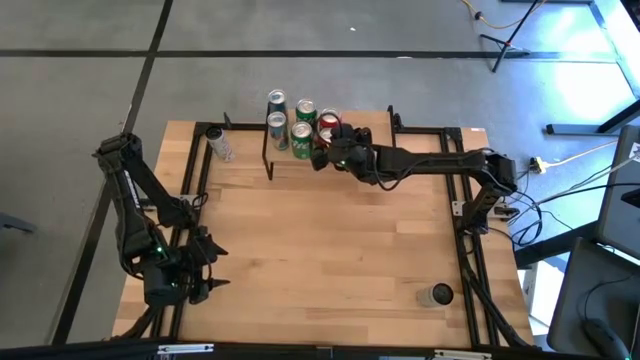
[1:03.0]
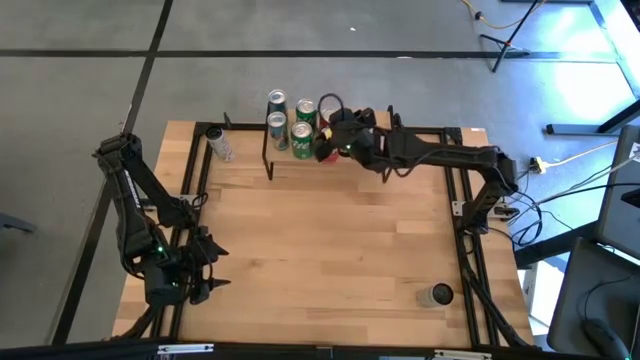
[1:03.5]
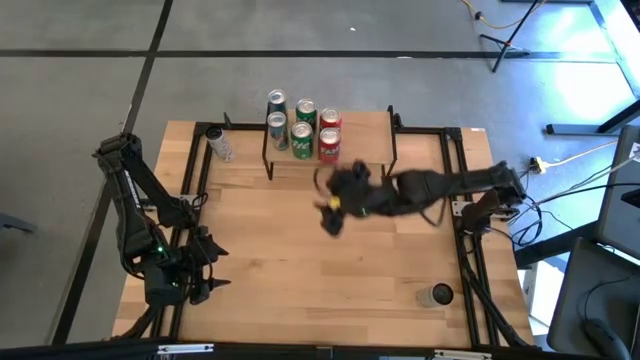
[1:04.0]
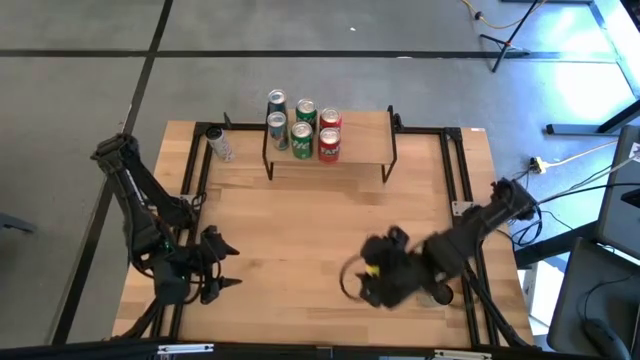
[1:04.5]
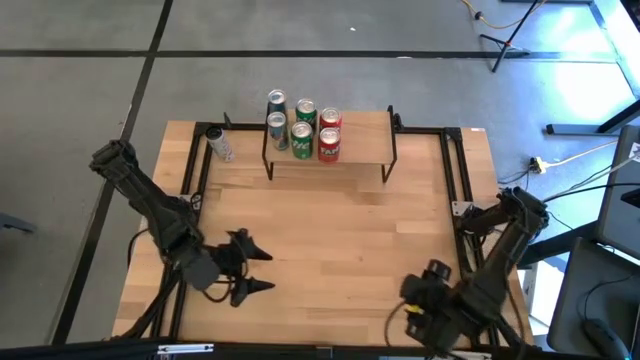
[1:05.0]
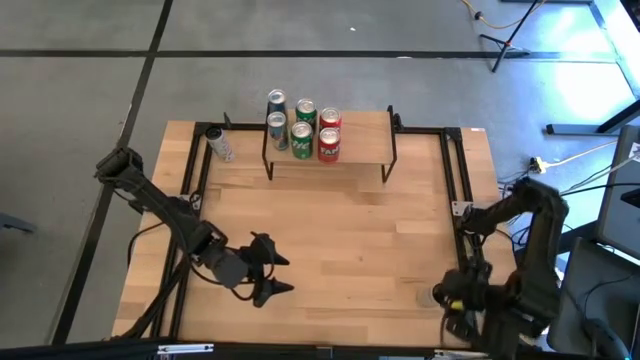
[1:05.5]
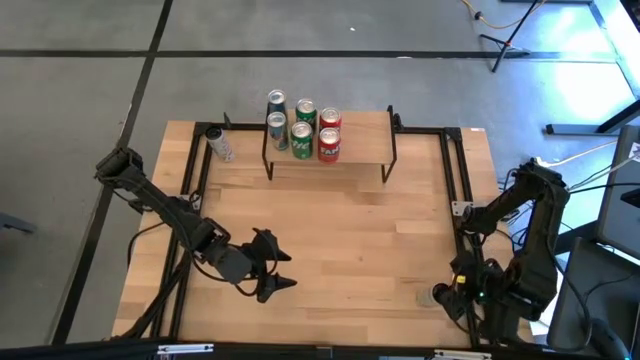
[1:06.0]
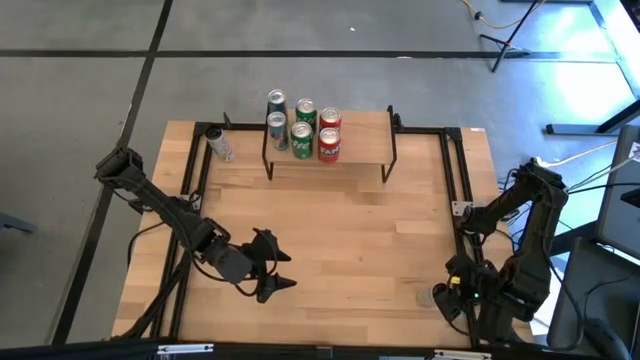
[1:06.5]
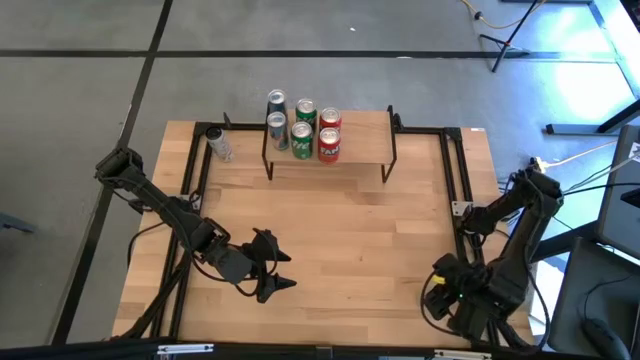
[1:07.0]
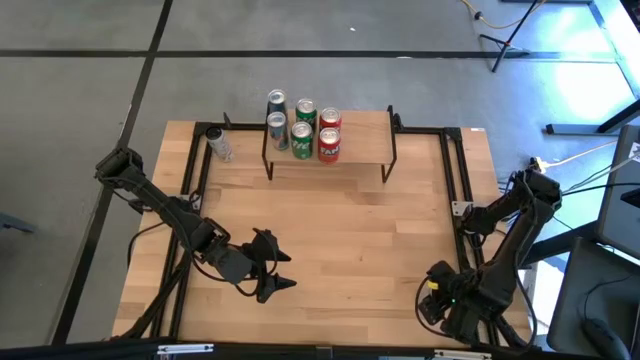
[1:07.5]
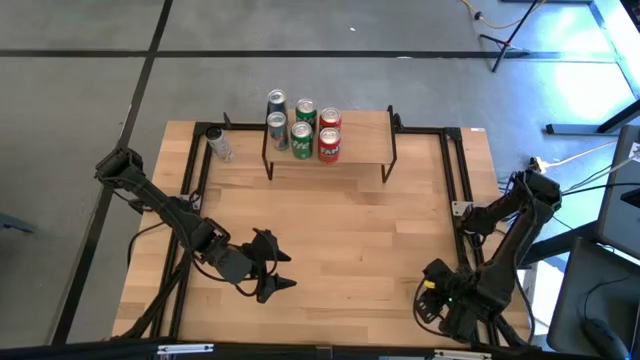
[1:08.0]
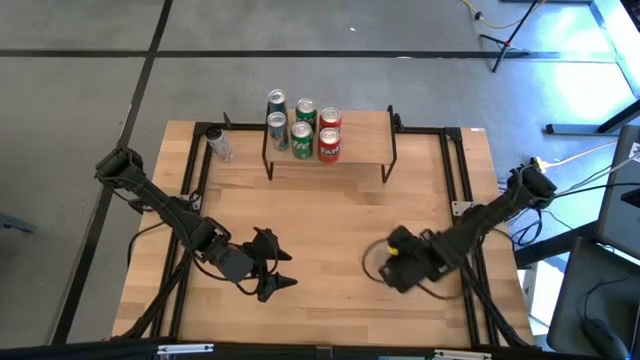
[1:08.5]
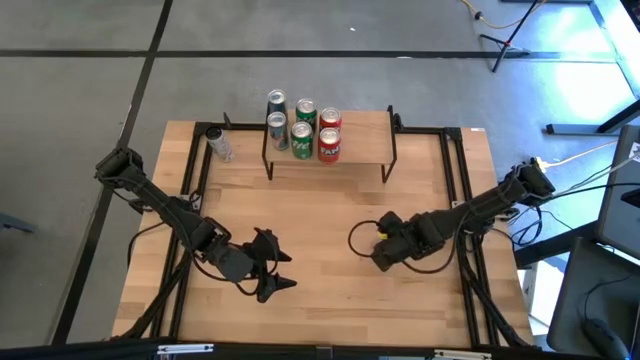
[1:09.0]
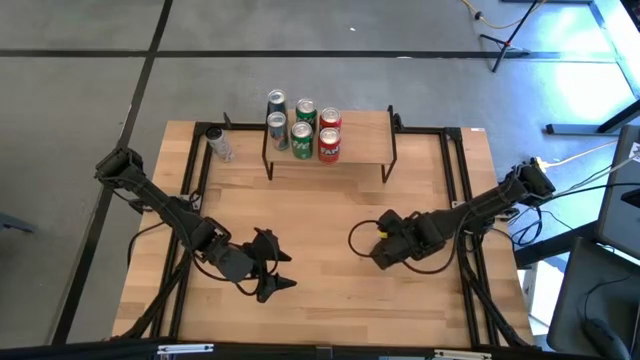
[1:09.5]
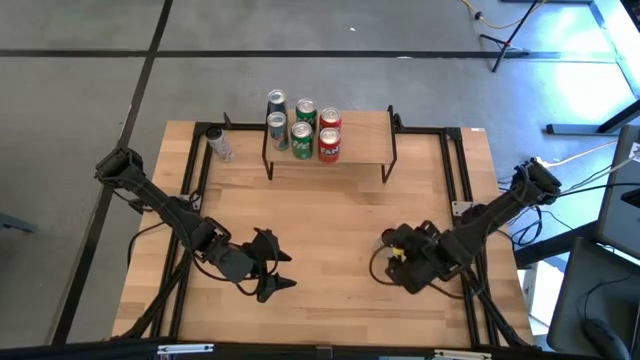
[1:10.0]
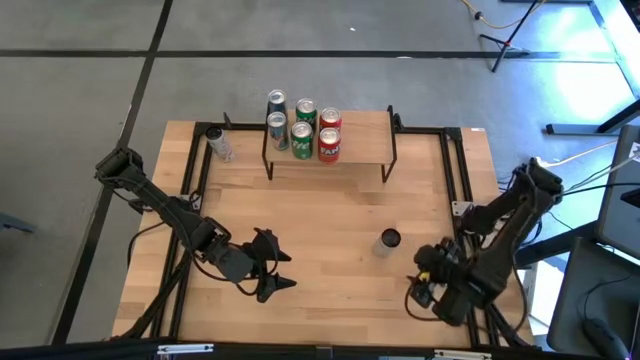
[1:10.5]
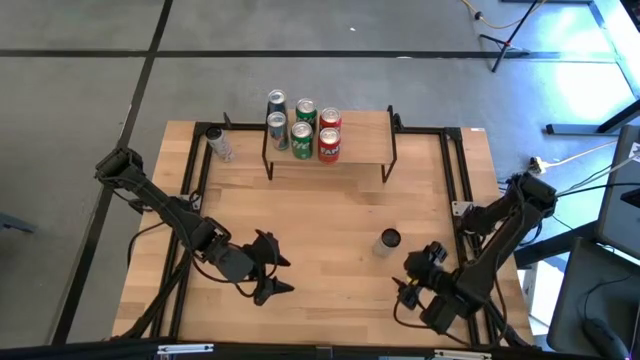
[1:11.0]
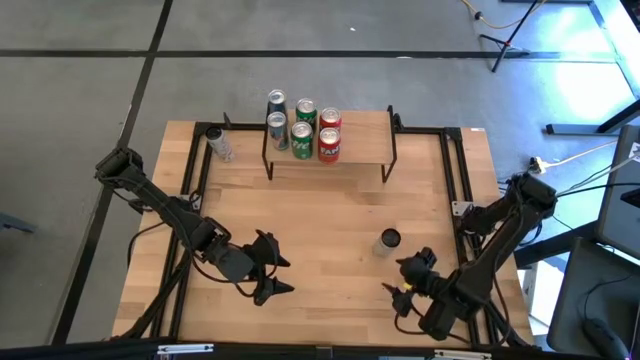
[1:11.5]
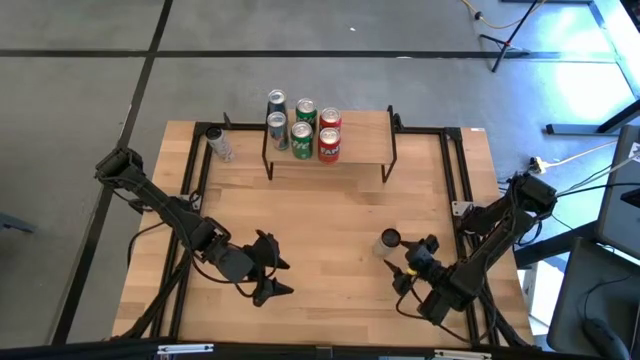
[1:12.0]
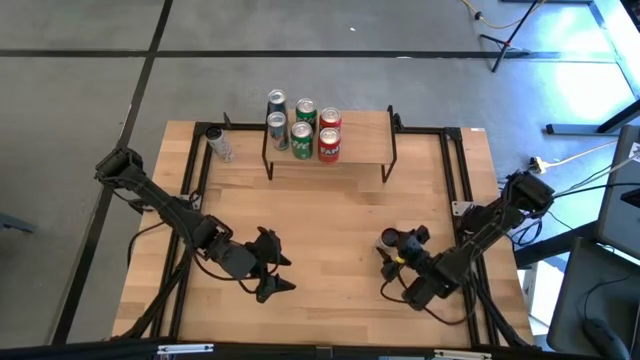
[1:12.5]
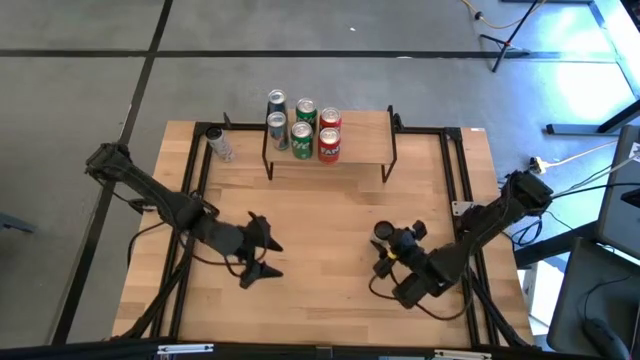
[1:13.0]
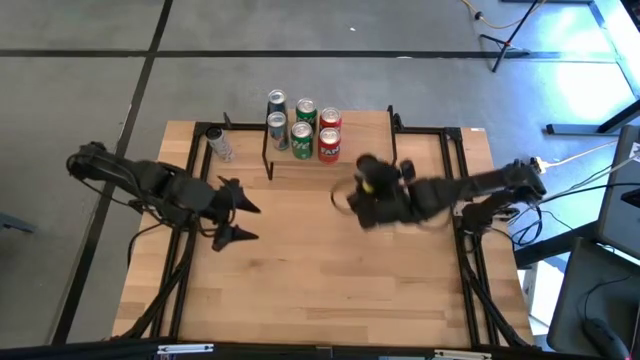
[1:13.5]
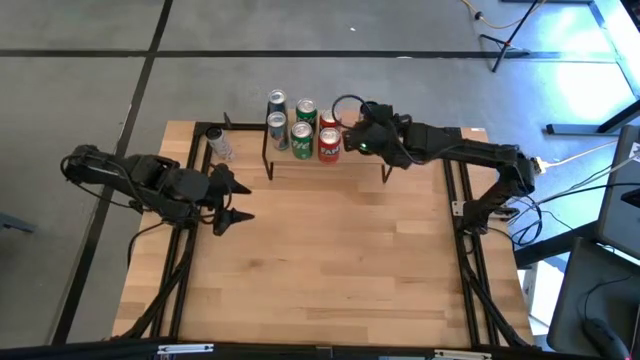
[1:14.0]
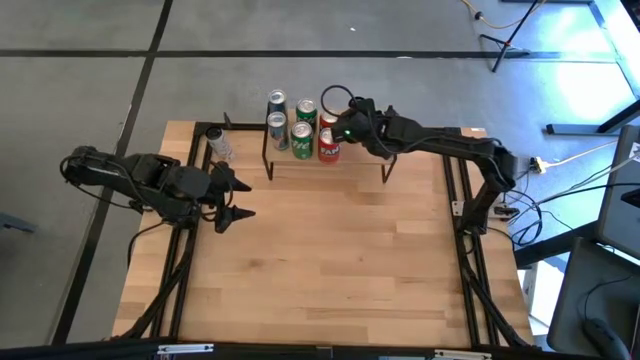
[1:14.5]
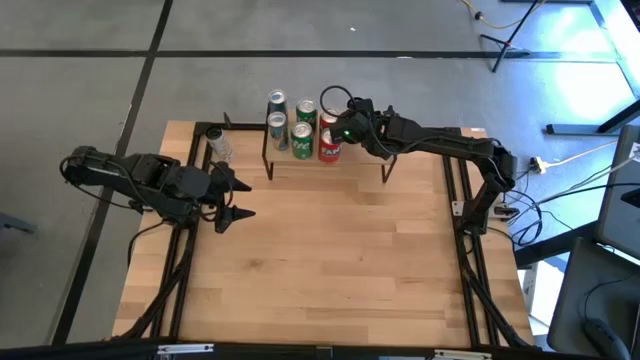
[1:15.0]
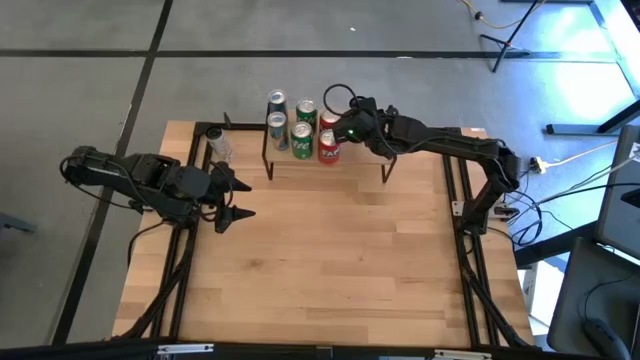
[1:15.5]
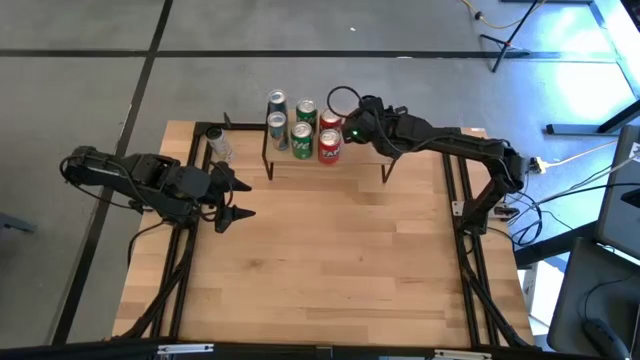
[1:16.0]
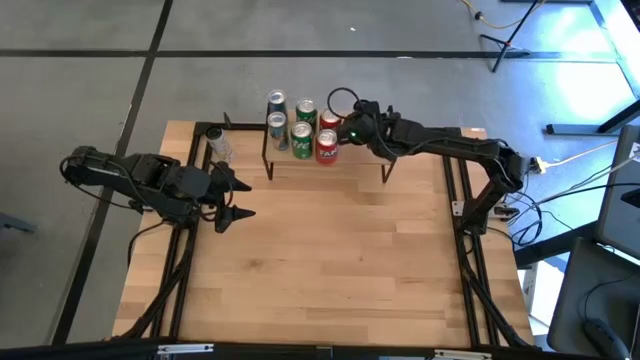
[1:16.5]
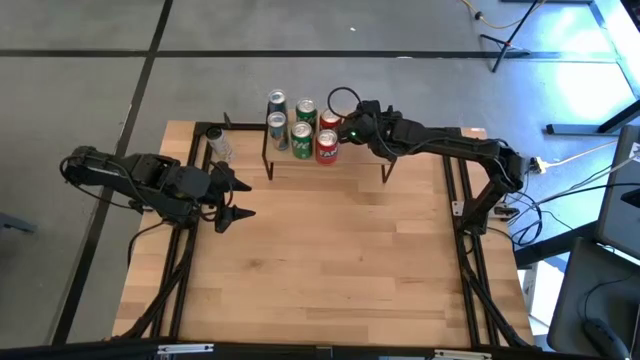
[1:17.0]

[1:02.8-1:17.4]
Task: Place canned beverage on shelf
Put the bottom white soda can on the shelf

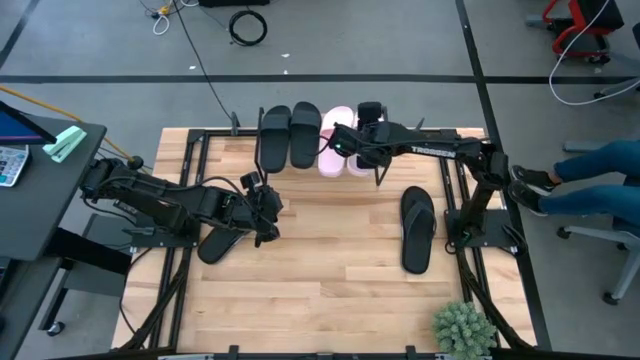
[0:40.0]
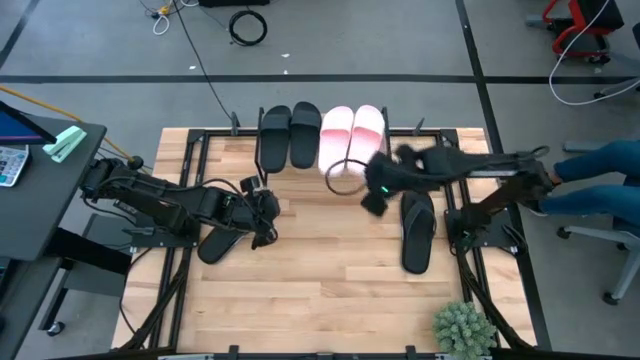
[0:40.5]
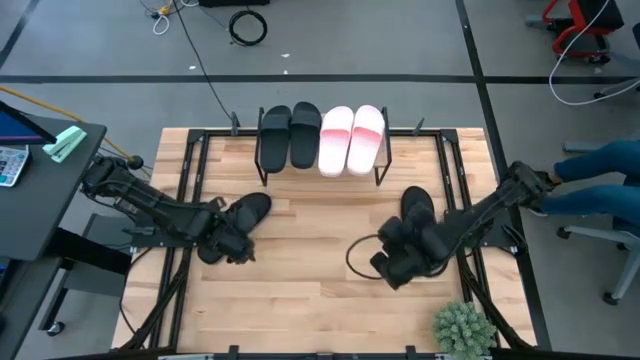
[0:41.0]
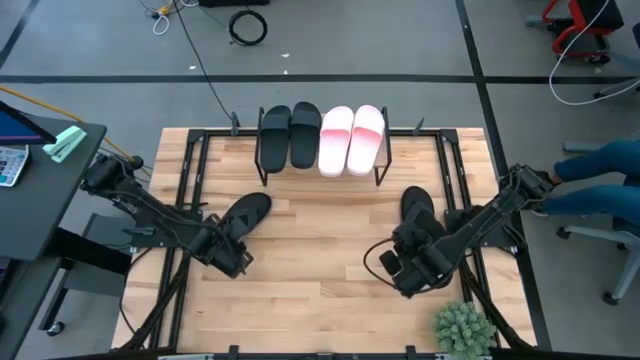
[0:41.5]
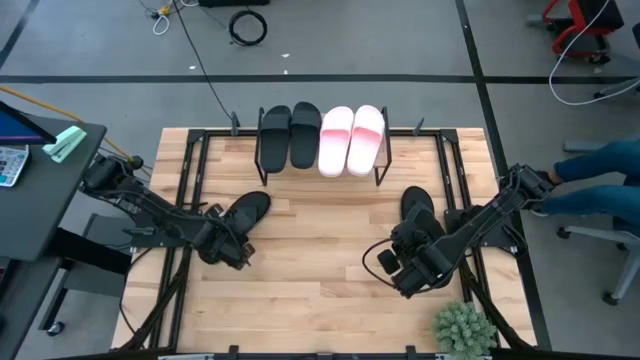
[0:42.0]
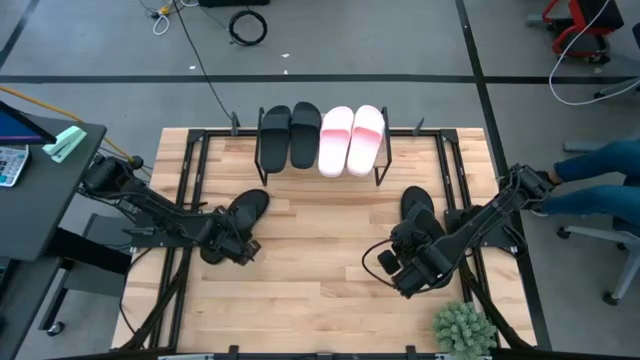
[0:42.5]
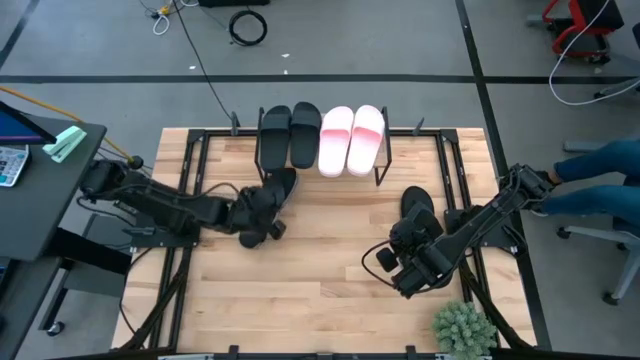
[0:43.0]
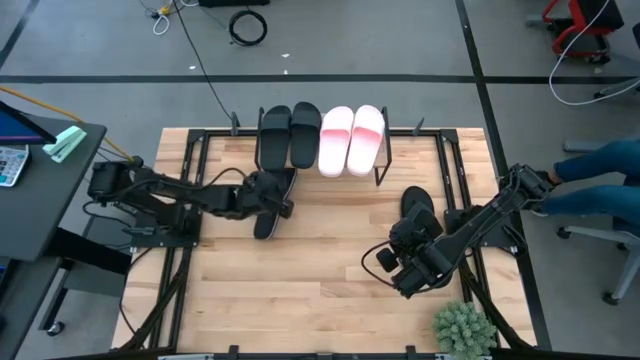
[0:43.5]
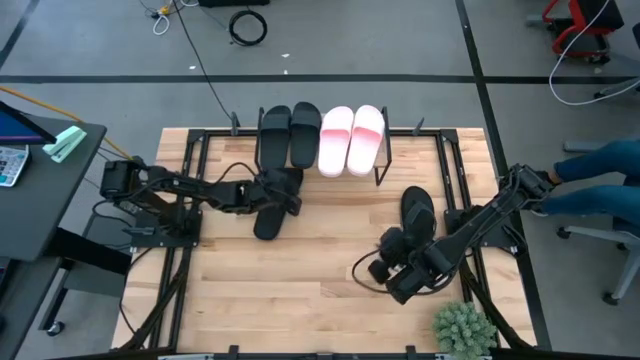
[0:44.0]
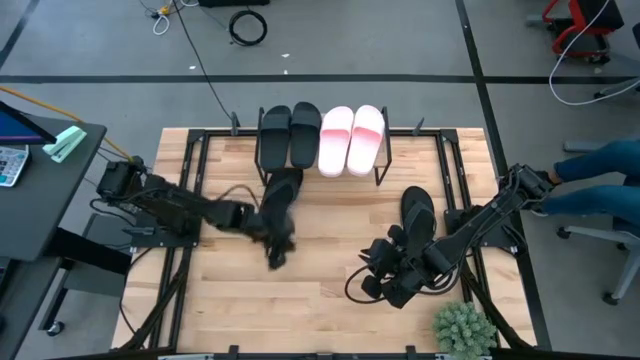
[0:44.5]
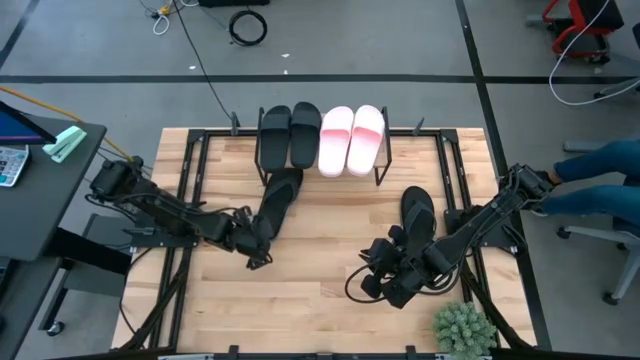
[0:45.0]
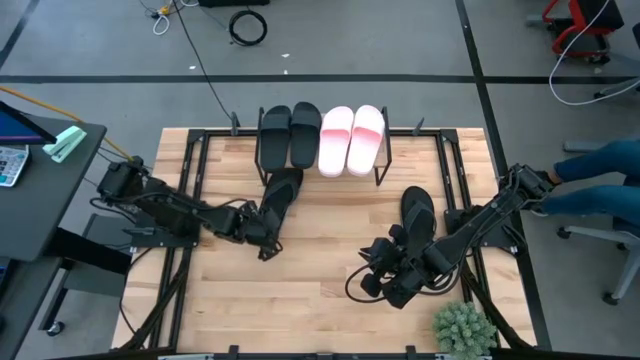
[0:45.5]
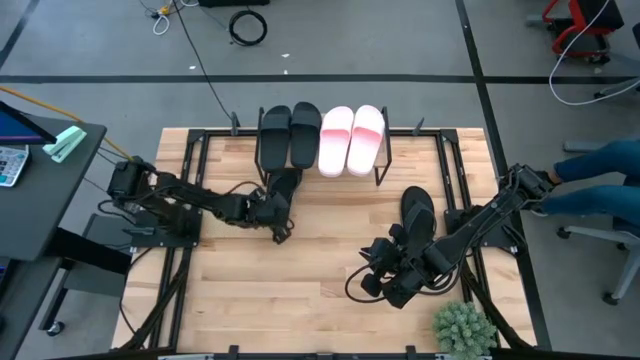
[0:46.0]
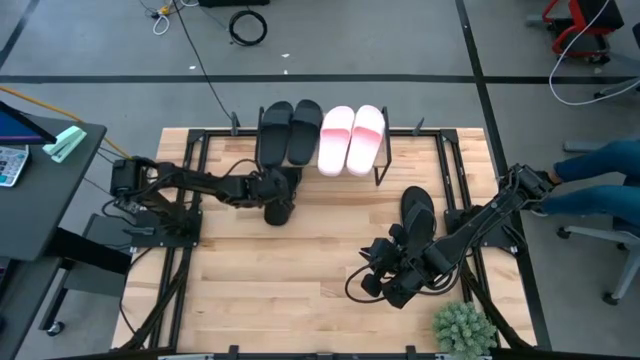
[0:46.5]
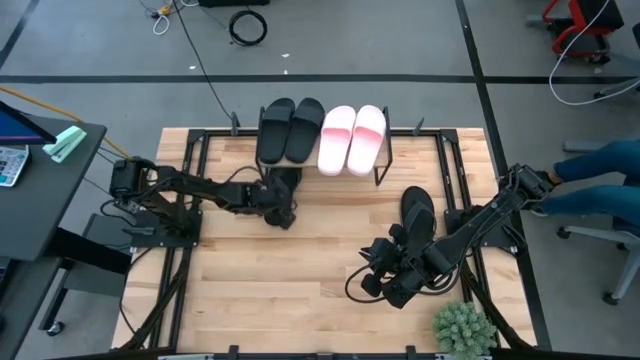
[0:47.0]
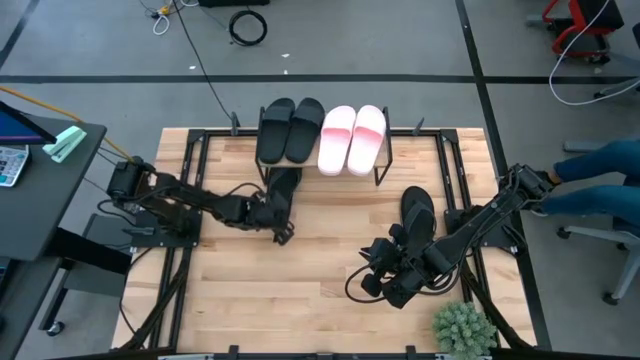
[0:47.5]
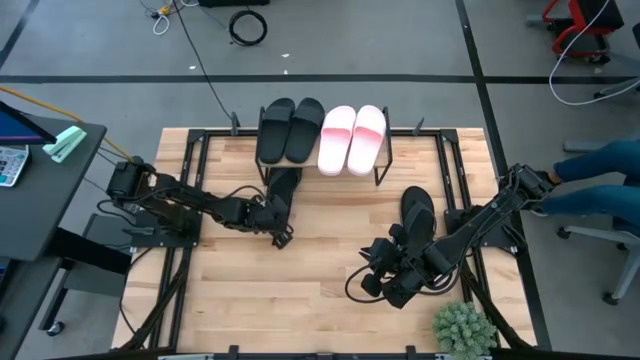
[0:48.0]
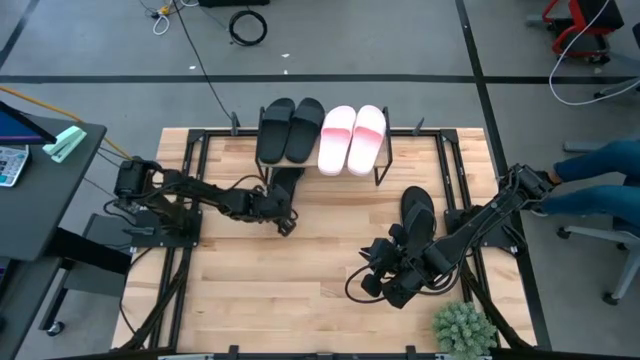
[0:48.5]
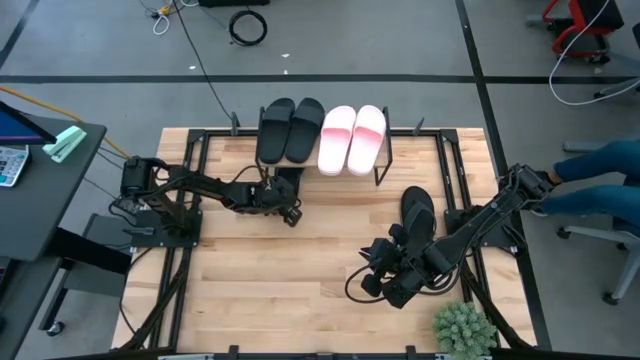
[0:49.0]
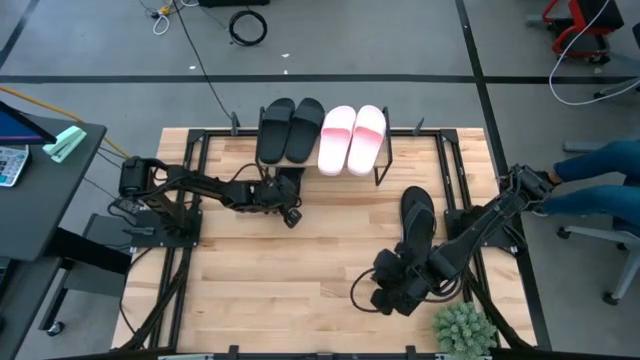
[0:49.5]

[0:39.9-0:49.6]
Task: Pick and place slides into the shelf
Put the left black slipper under the shelf
